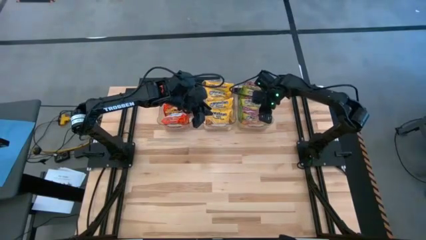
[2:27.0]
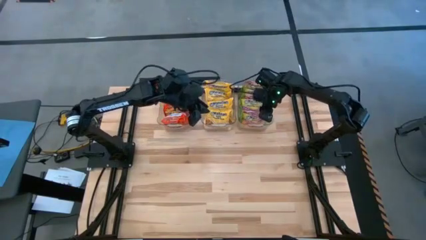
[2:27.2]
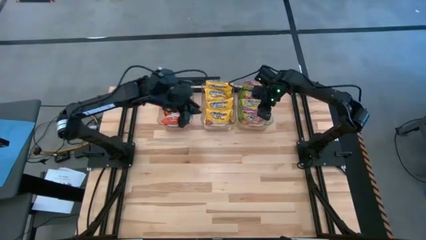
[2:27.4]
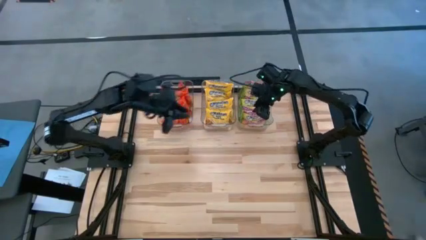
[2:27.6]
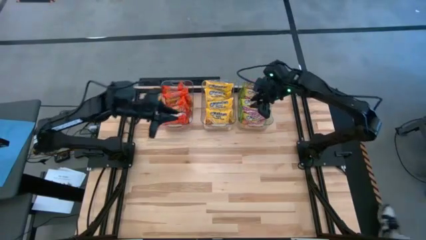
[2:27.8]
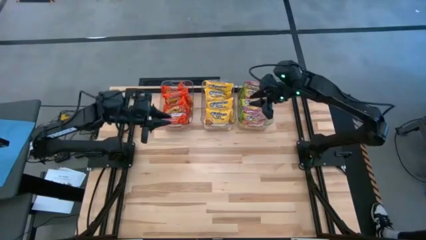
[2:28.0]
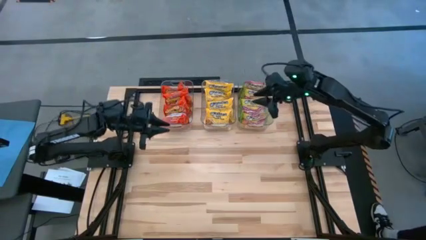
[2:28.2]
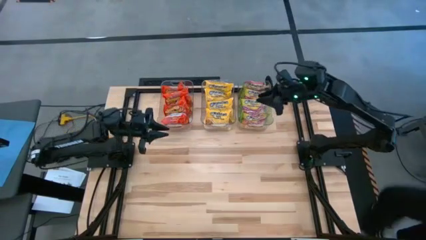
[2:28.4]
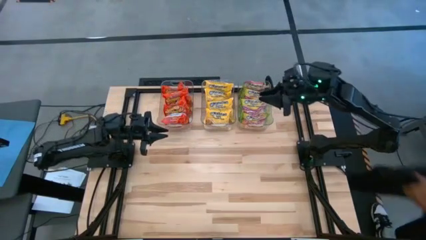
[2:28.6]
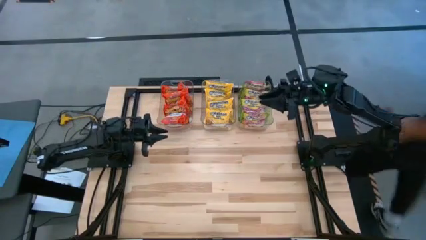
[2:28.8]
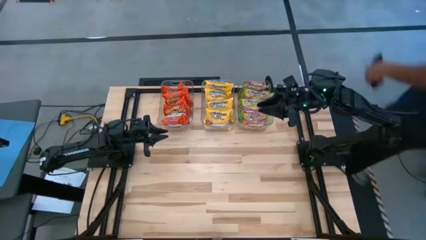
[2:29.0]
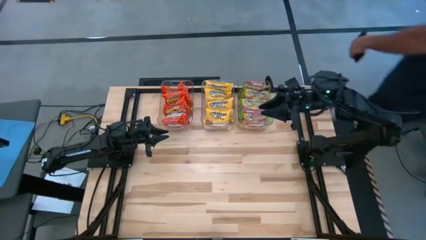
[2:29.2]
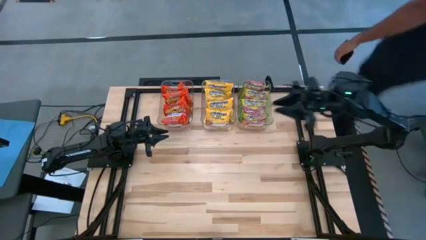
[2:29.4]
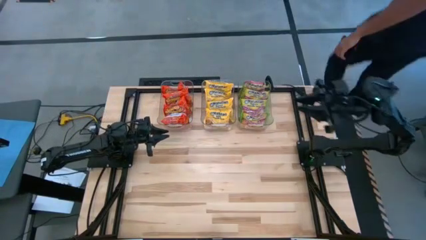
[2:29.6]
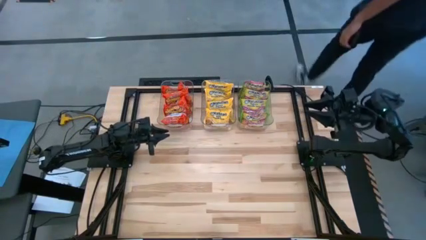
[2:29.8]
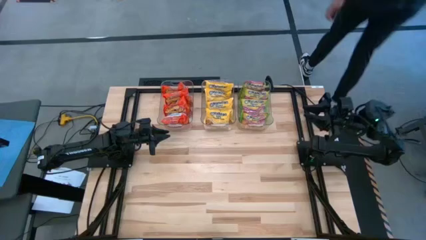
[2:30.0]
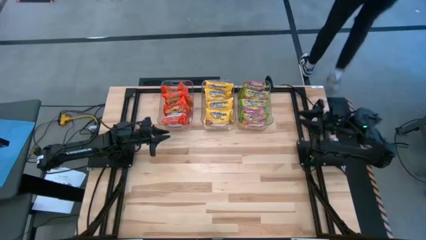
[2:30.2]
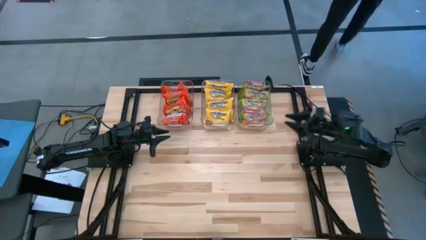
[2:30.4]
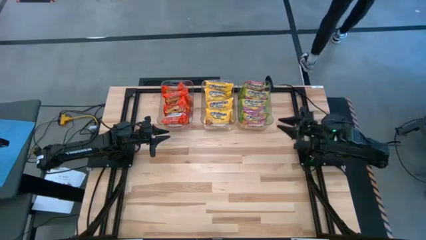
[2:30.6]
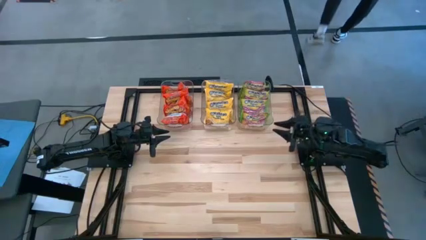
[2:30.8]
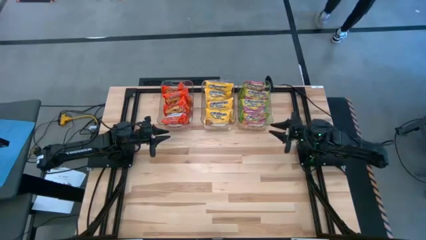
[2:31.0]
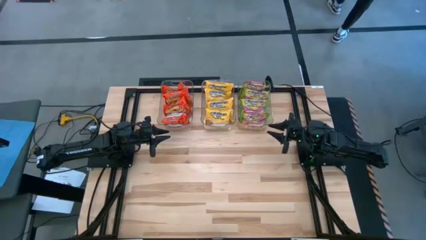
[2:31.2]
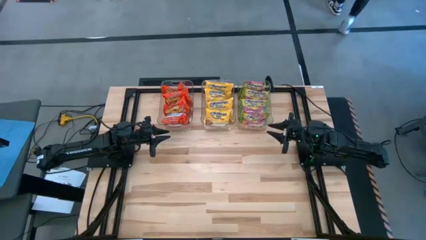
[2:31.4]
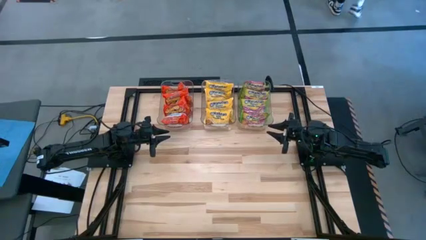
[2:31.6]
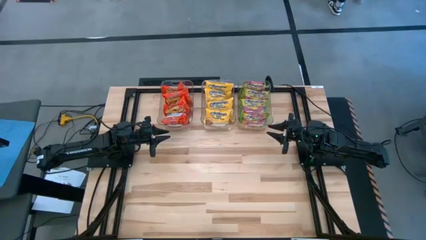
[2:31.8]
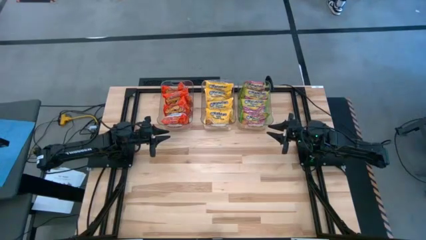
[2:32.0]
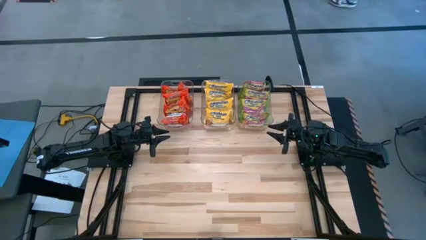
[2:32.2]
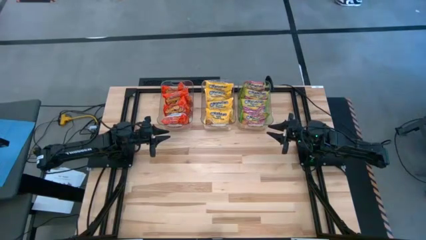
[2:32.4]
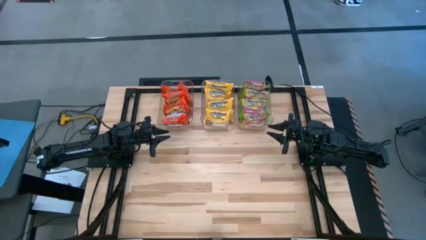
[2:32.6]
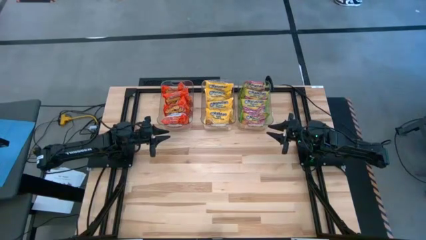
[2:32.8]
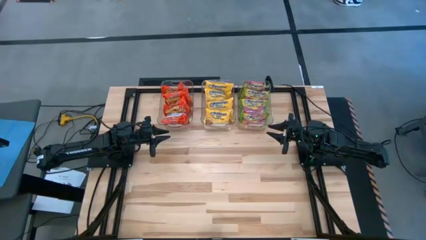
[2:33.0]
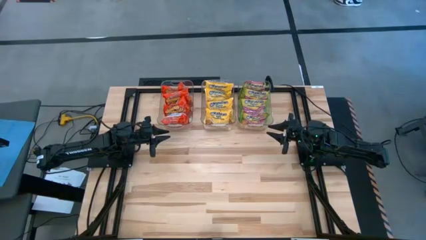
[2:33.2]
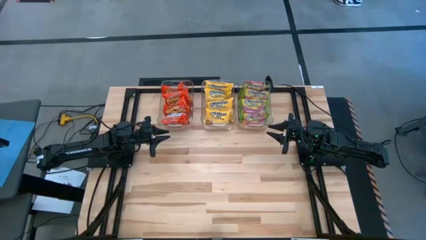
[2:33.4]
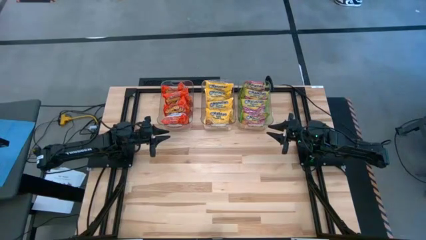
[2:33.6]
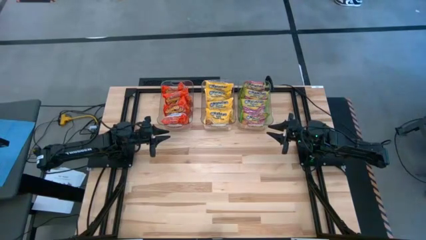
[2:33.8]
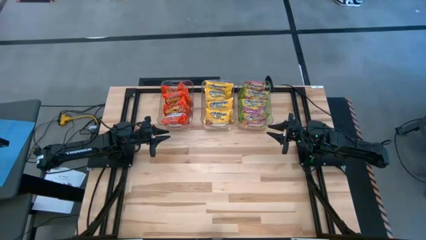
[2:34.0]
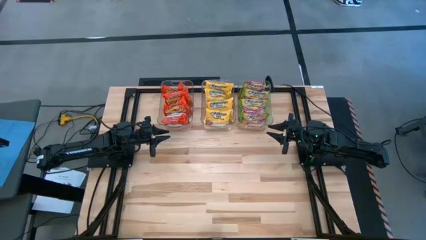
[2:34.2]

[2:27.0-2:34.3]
Task: Sort Maruchan noodles
Return to Home Position

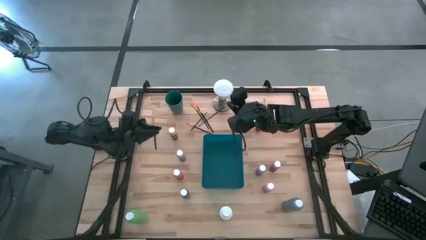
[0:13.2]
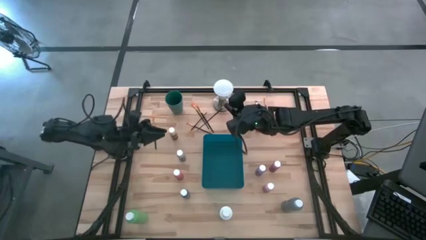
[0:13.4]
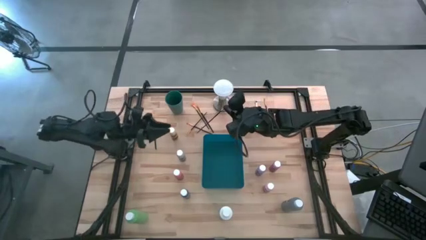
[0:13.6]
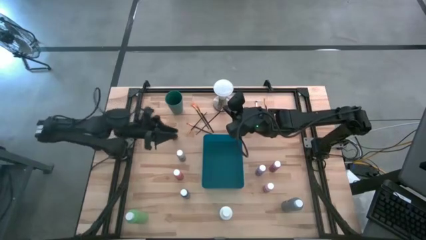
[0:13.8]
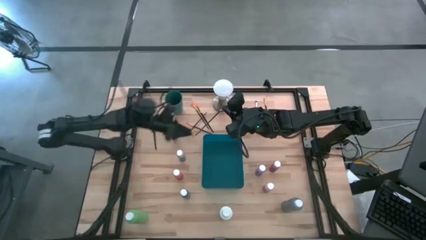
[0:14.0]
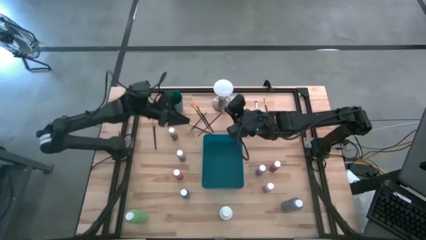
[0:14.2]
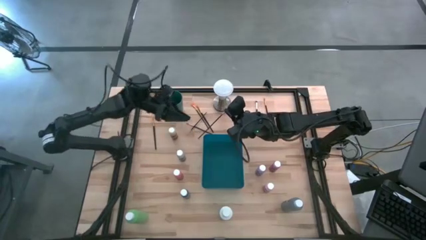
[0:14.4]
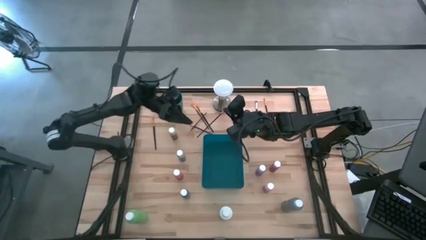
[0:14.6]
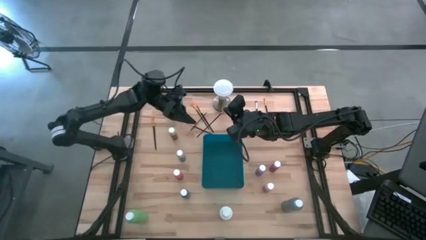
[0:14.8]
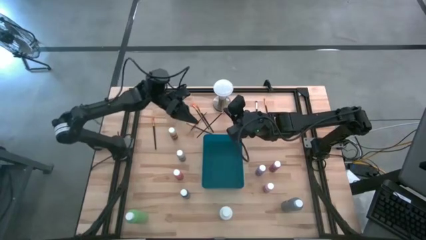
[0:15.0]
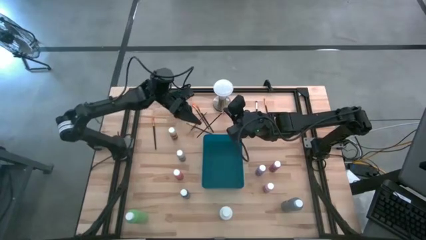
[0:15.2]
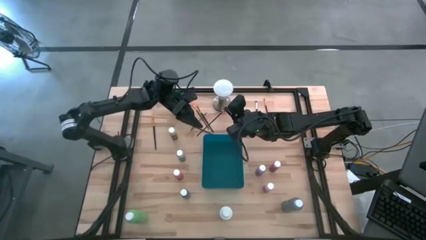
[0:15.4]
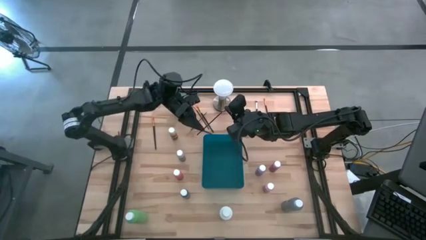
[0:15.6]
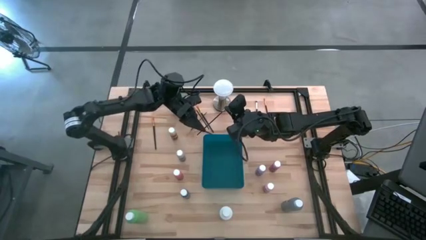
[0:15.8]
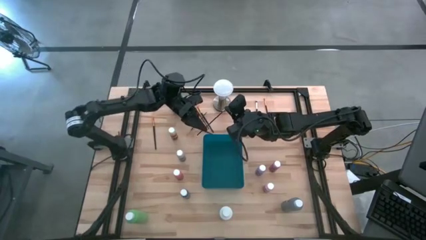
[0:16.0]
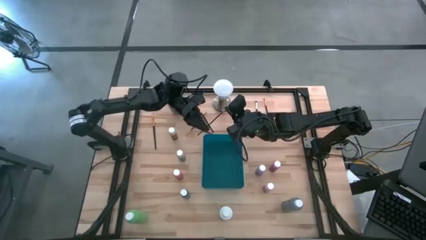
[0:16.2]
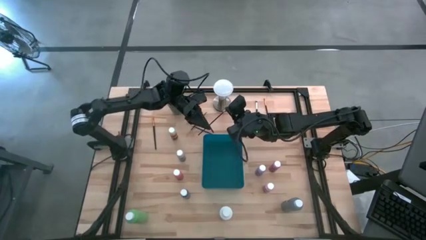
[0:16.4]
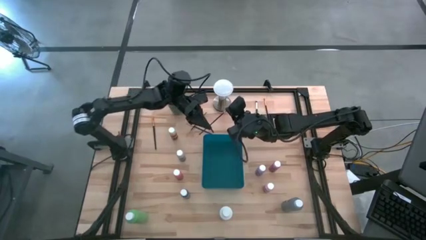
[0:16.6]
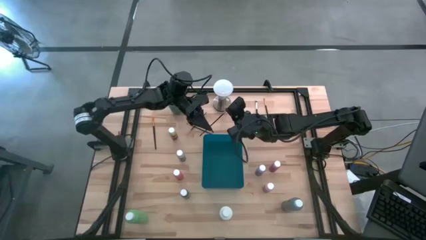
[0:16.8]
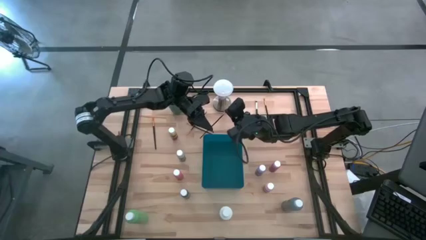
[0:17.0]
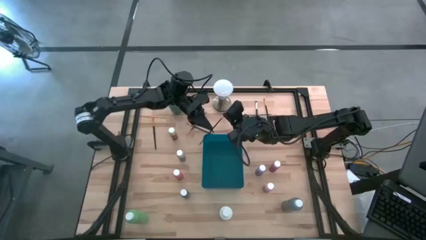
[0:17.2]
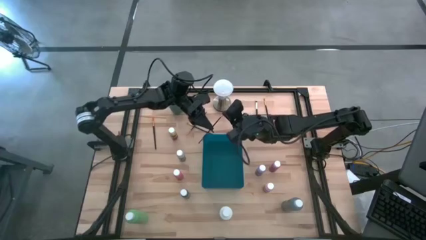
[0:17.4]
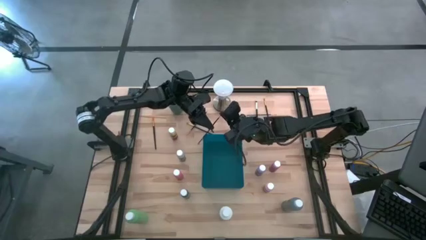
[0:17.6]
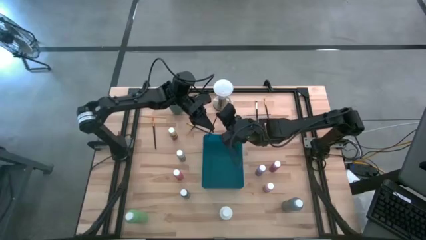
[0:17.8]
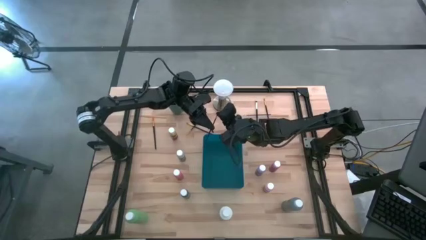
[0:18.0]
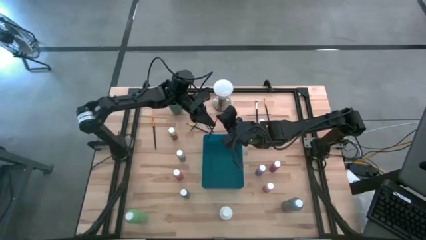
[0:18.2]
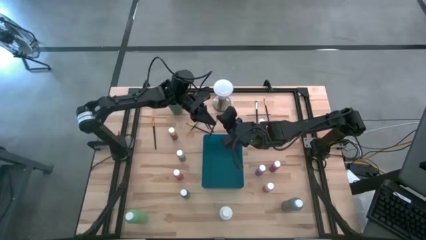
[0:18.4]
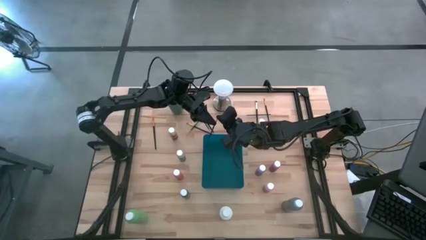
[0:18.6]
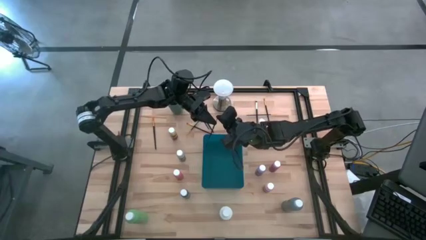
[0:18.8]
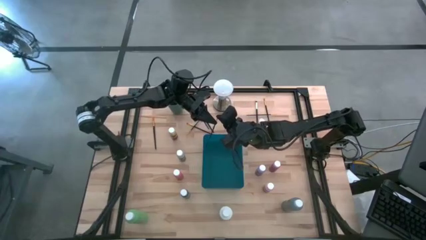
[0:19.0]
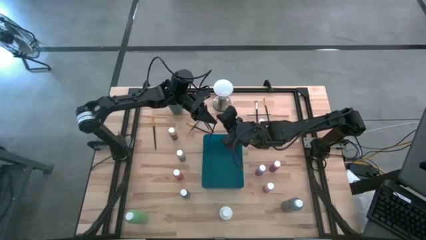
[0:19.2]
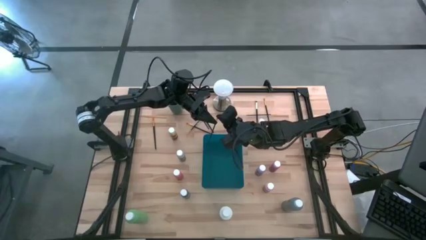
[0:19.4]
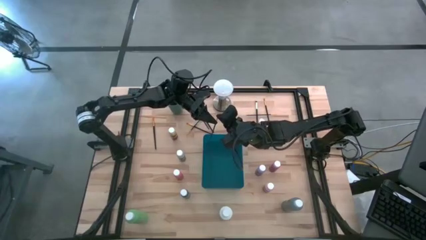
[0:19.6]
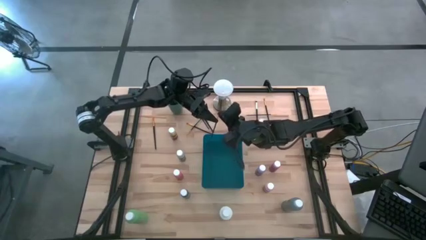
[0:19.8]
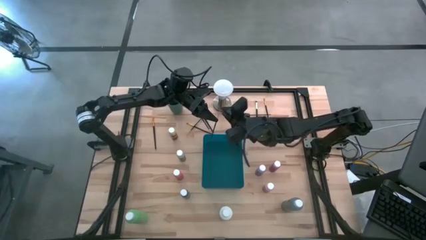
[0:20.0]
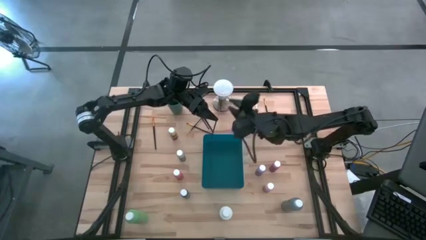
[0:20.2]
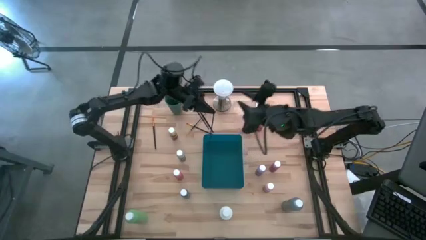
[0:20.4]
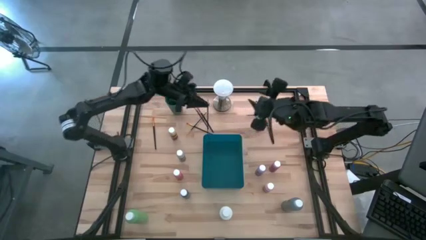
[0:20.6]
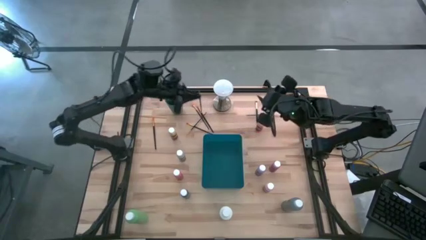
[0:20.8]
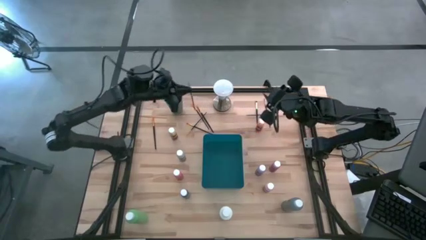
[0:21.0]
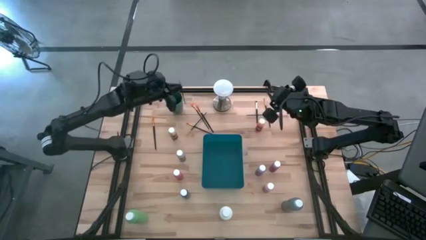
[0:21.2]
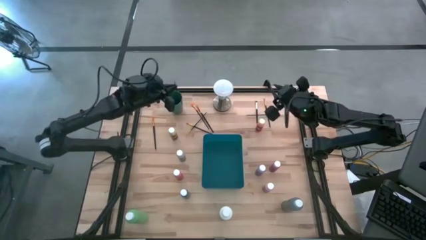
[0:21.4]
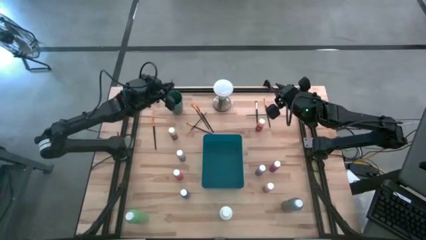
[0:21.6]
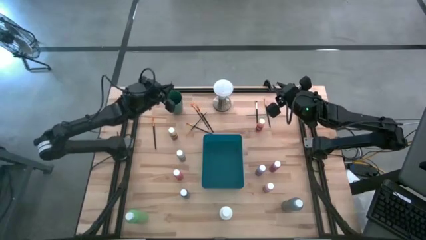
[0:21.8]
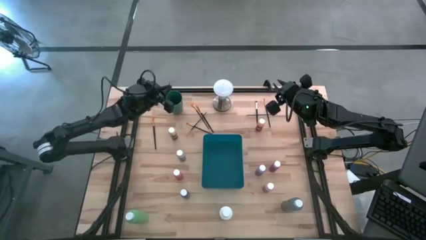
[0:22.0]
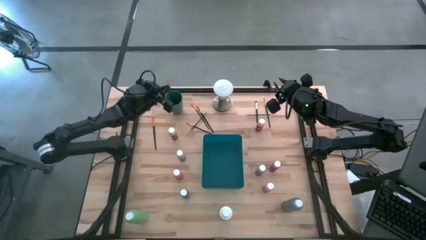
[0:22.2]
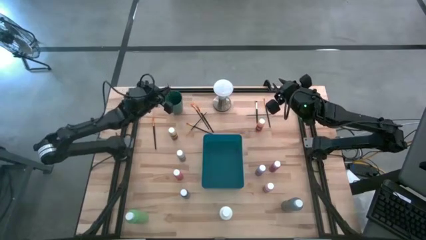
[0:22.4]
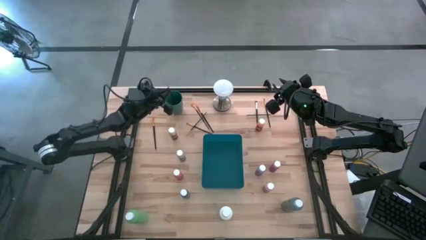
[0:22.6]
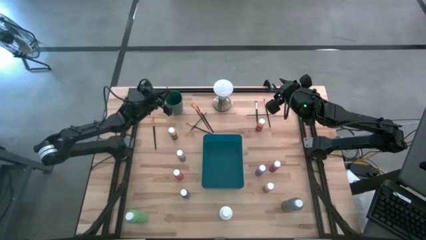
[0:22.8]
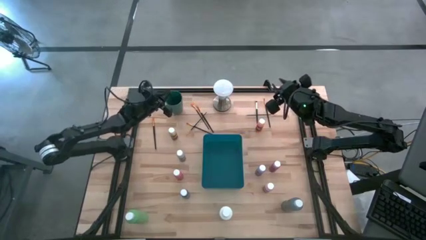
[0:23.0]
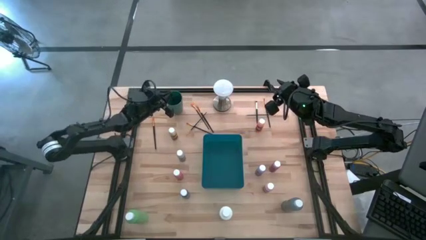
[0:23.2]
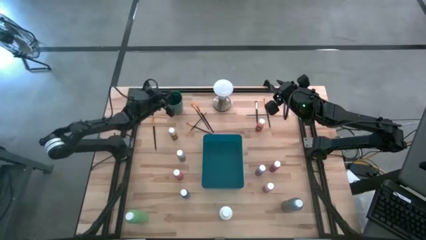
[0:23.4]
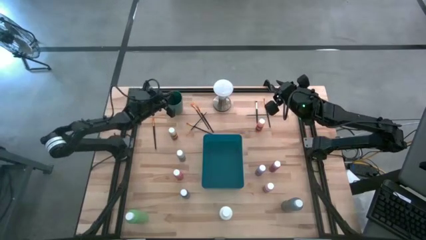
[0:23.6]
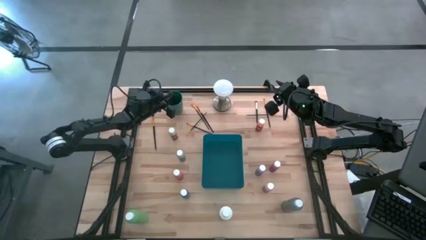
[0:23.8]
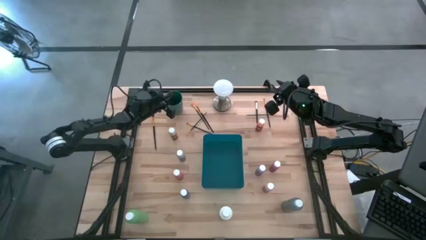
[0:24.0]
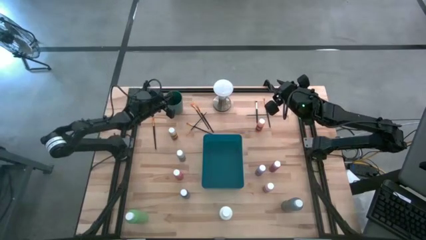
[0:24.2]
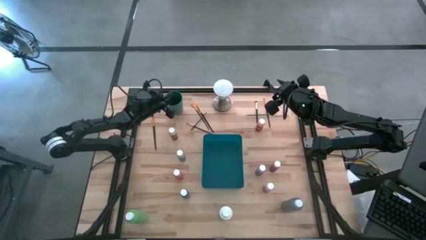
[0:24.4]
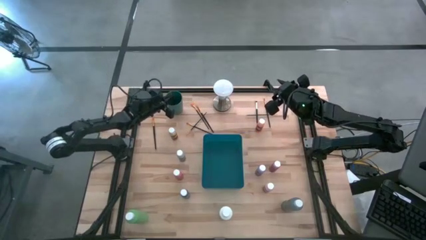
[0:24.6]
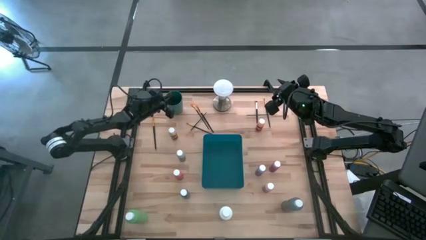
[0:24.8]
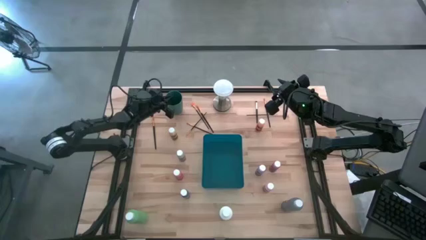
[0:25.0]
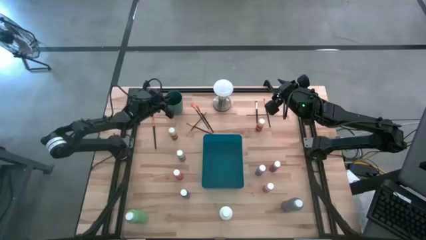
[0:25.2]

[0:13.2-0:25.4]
Task: Pick & Place Paint Supplies
Put the yellow paint brush into the green cup
